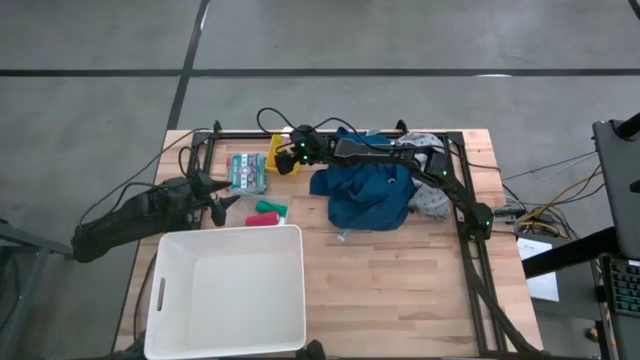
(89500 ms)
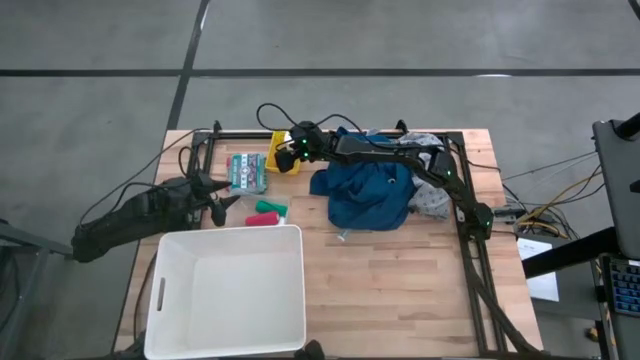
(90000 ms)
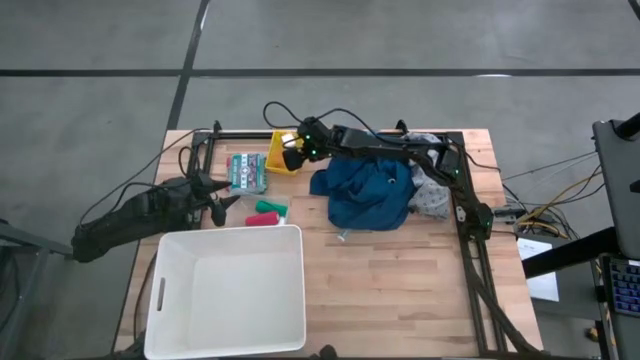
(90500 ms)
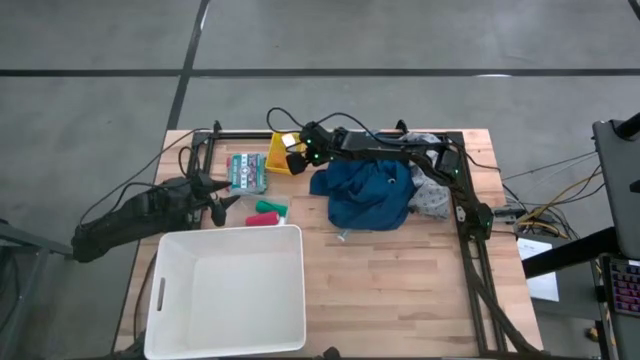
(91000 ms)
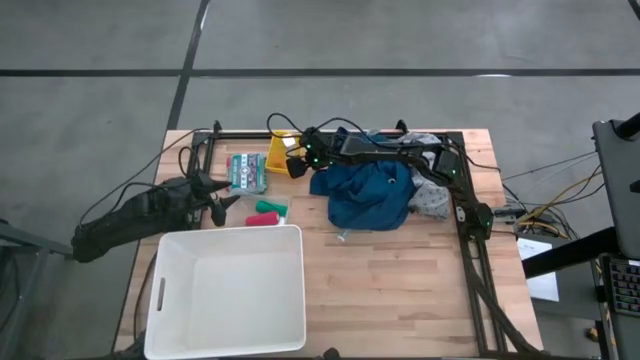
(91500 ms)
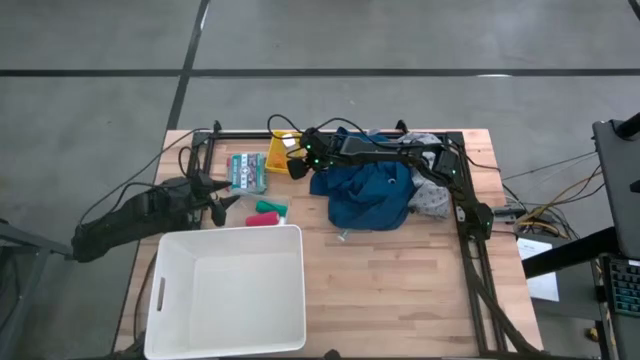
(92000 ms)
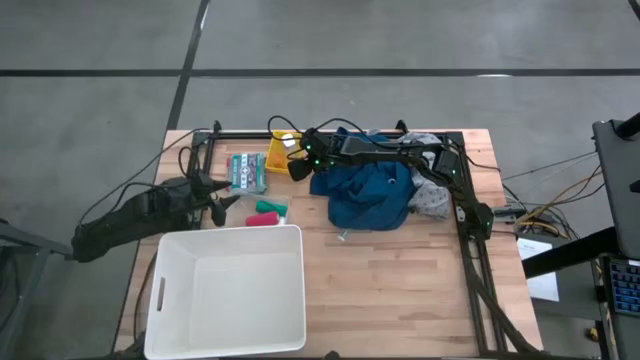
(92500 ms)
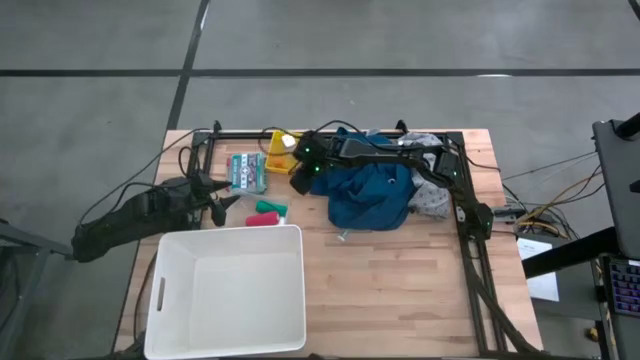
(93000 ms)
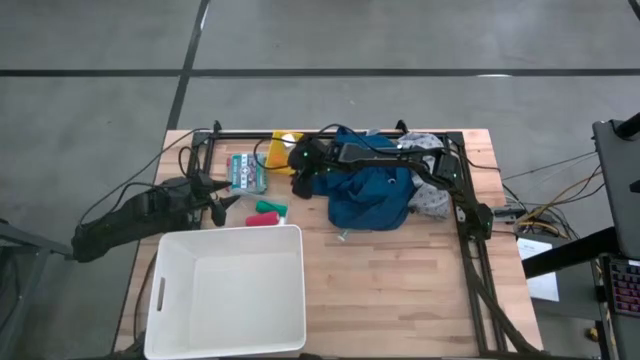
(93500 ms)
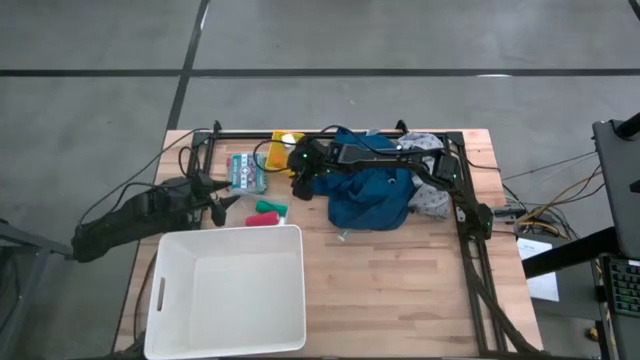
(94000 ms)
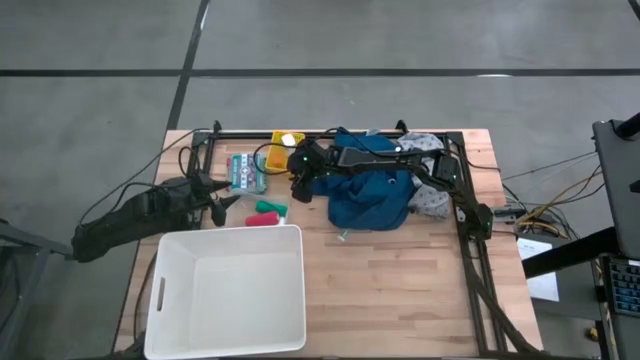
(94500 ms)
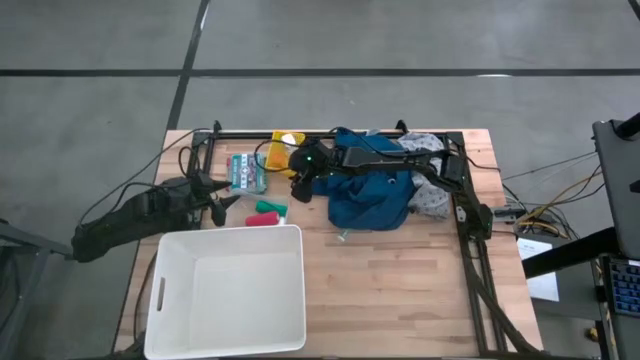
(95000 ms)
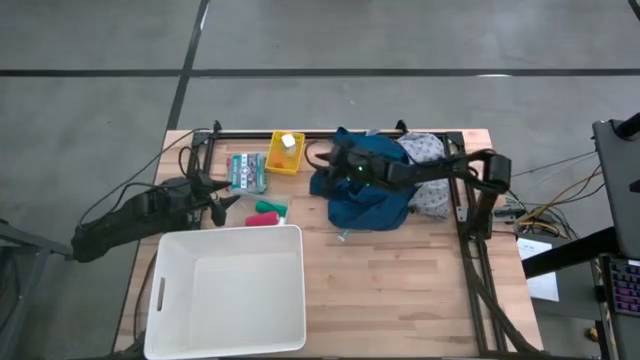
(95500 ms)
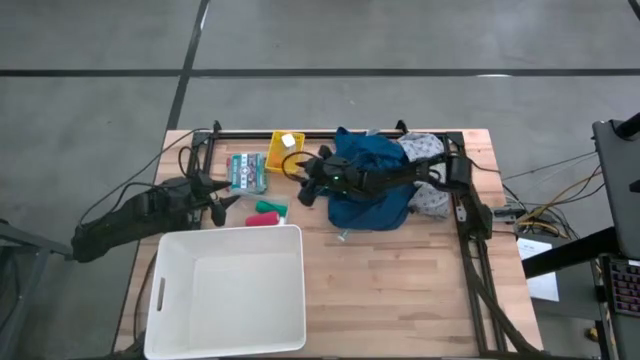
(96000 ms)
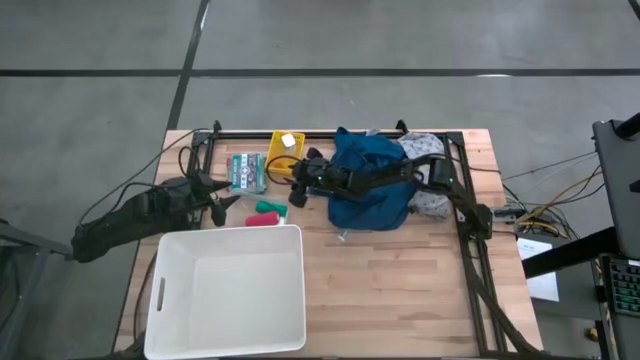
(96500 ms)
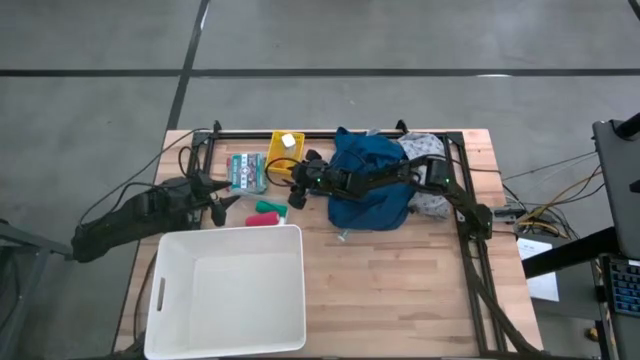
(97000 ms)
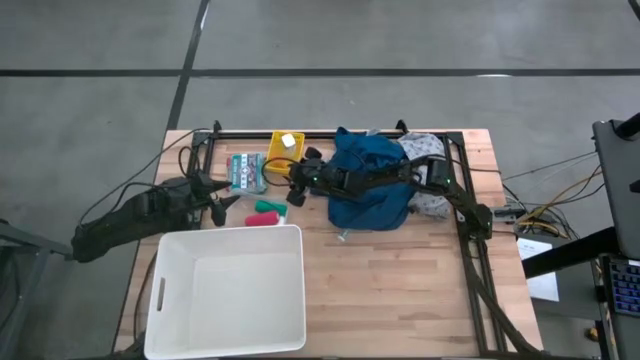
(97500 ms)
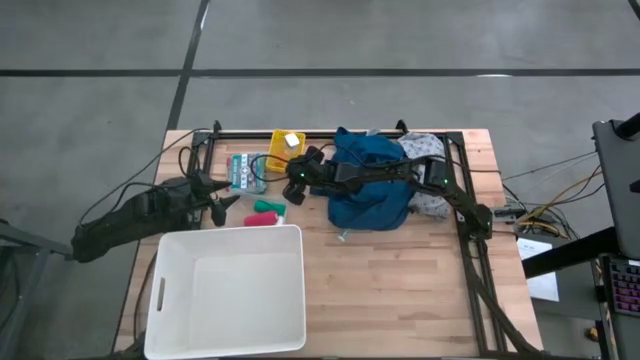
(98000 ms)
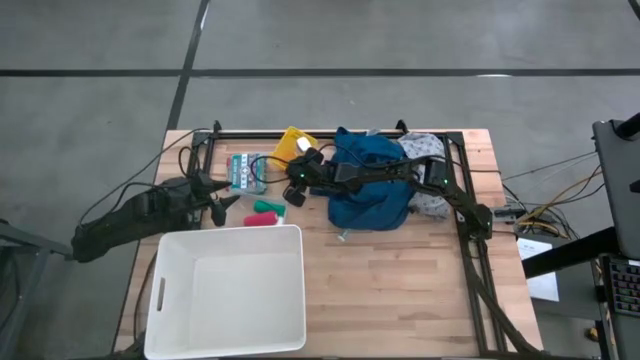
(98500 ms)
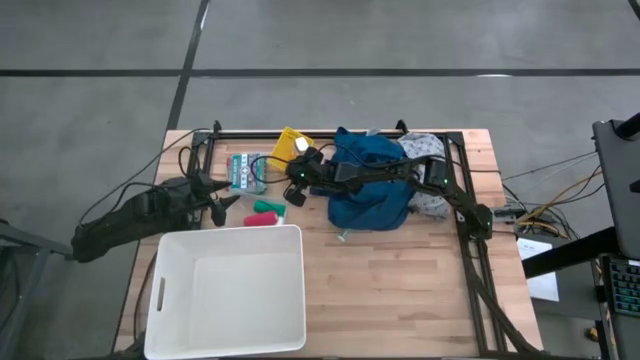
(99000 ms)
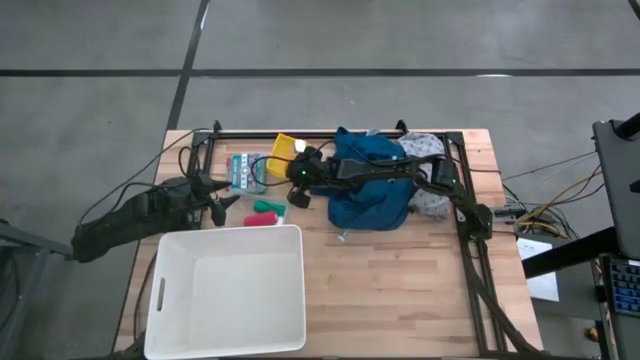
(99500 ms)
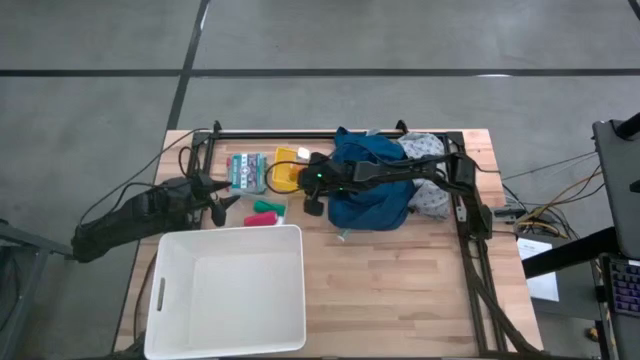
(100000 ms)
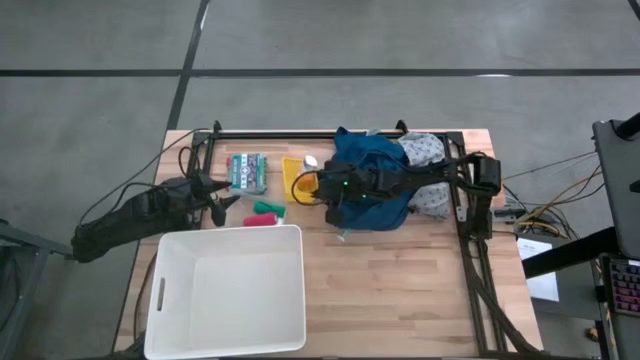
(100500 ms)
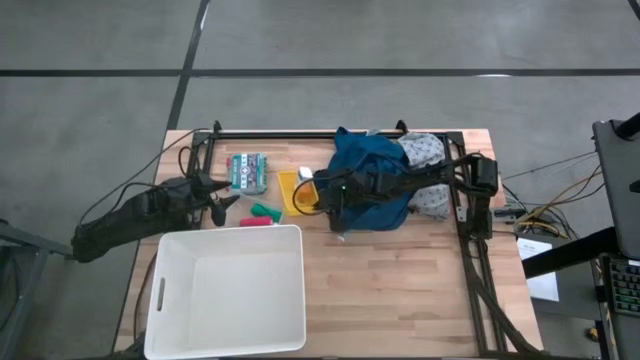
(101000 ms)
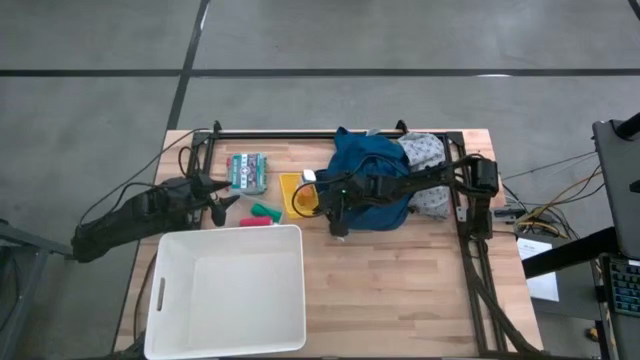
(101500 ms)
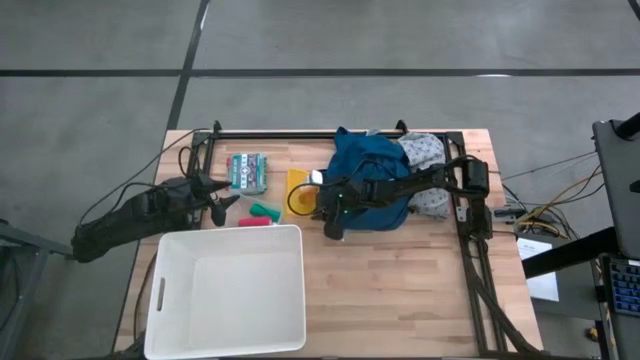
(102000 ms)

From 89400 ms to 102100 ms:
Task: Pick & place medical supplies in basket/bin
Adjust the yellow bin

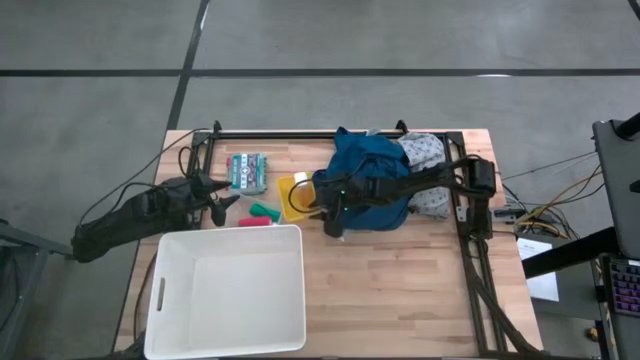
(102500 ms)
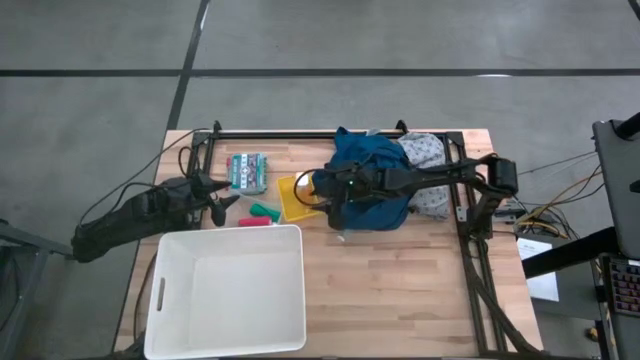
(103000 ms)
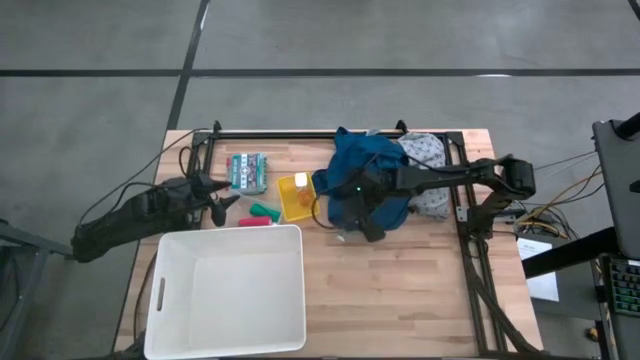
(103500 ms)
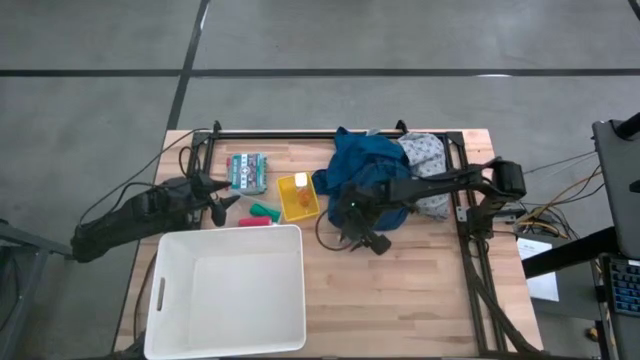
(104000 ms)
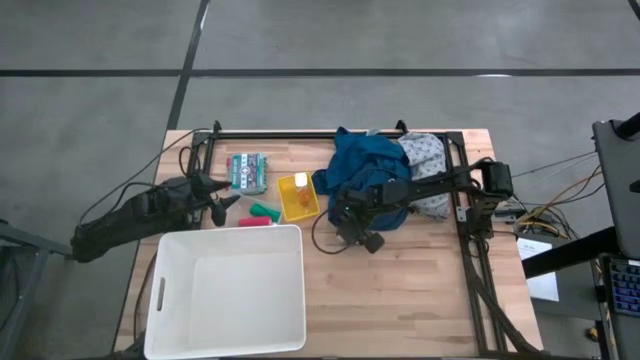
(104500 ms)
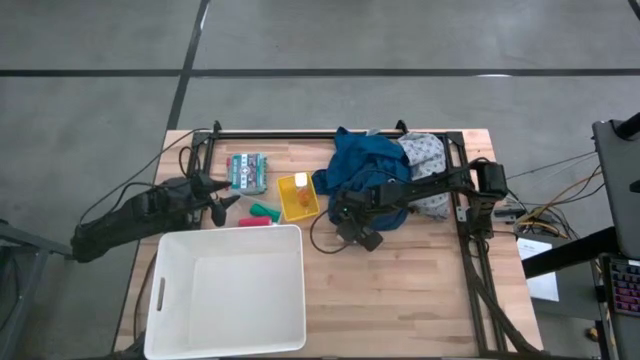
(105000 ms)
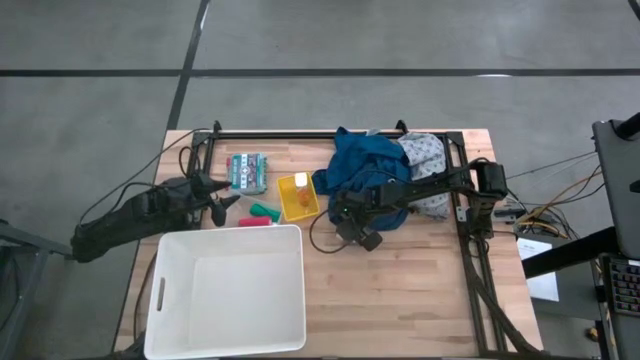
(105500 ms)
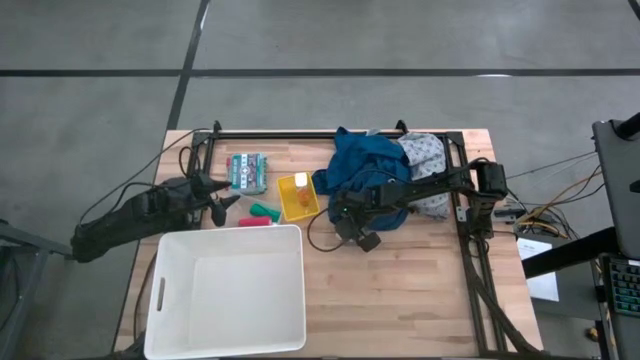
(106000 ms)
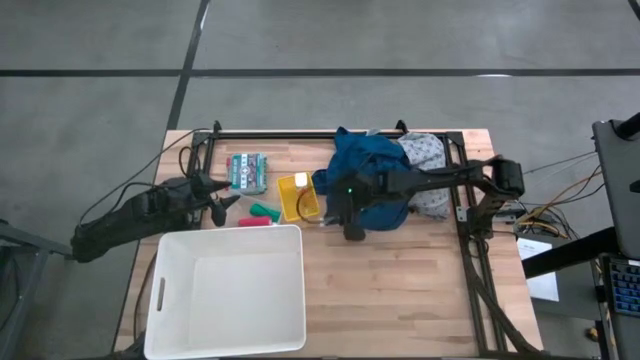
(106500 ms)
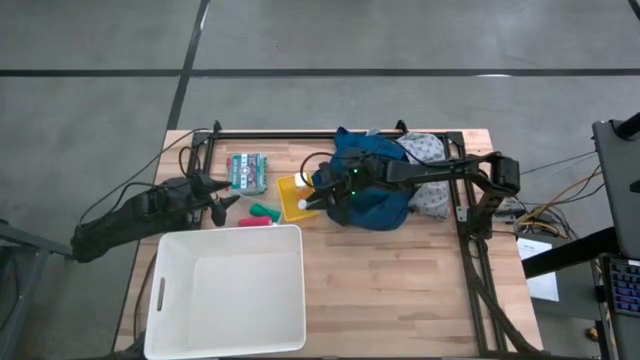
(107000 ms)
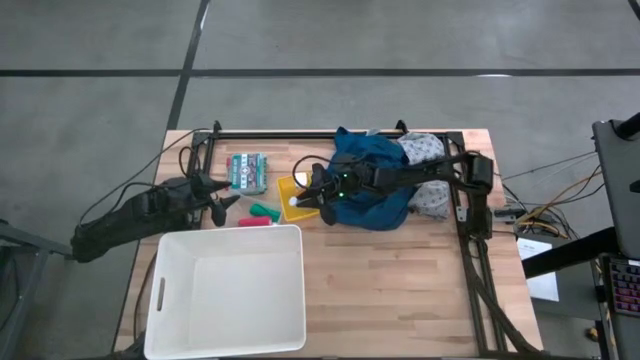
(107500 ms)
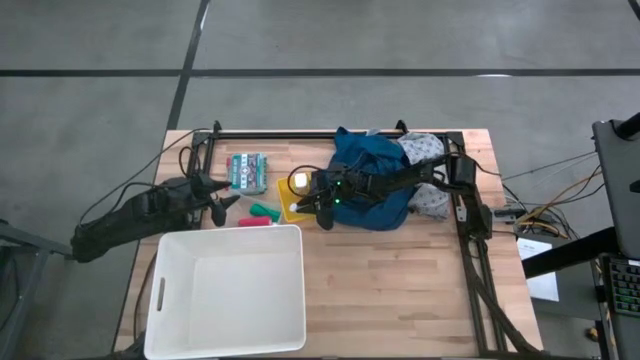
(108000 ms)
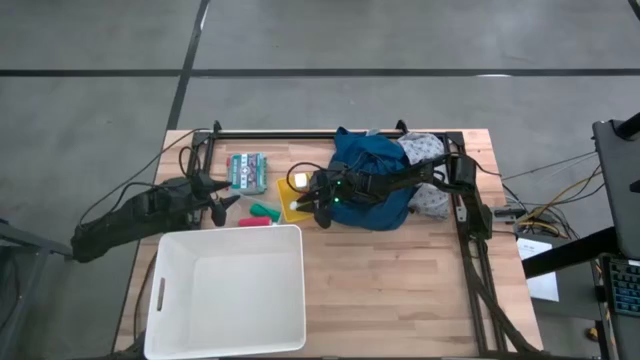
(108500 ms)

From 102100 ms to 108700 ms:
Put the blue pill bottle into the yellow bin
